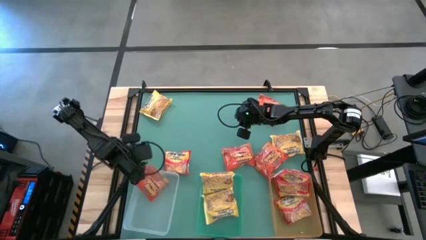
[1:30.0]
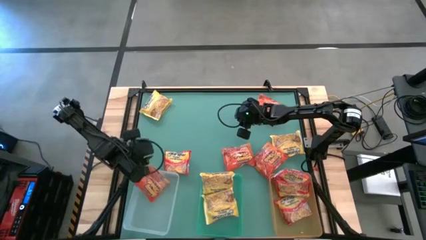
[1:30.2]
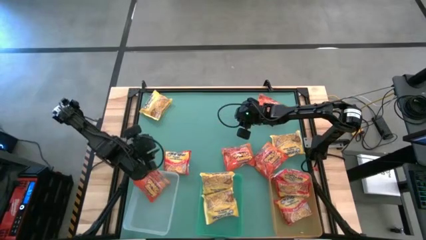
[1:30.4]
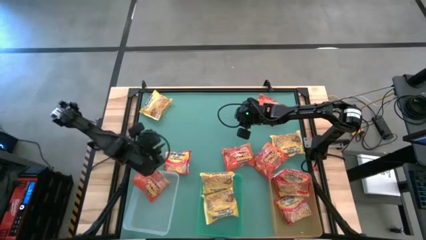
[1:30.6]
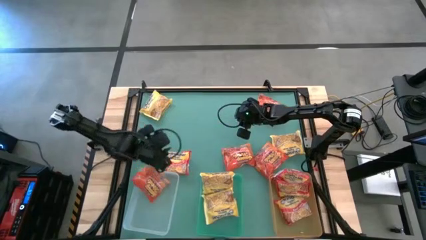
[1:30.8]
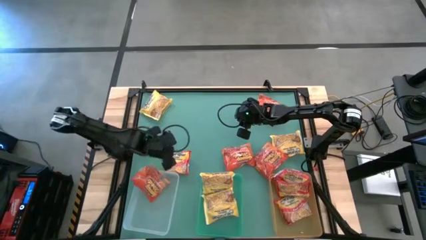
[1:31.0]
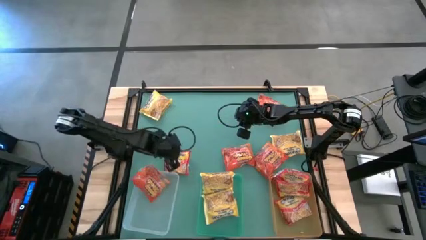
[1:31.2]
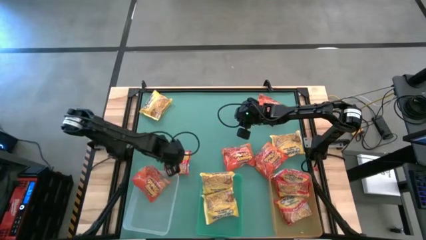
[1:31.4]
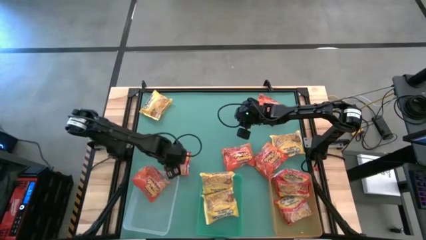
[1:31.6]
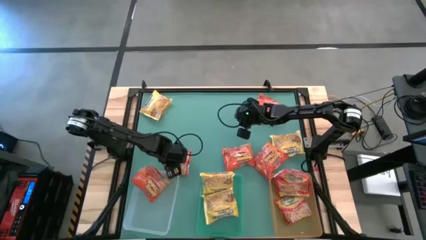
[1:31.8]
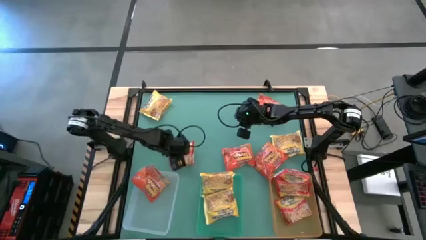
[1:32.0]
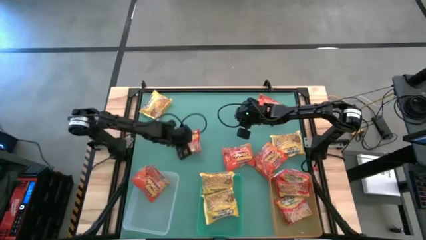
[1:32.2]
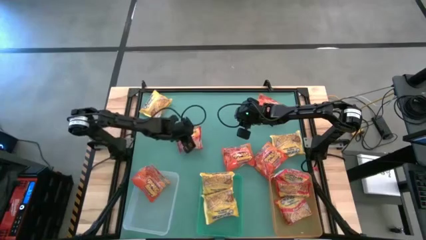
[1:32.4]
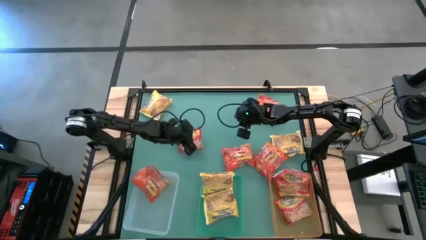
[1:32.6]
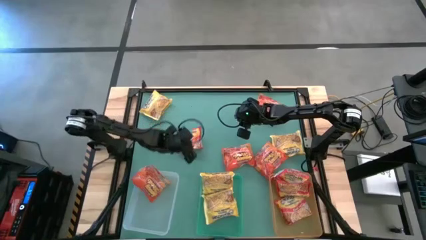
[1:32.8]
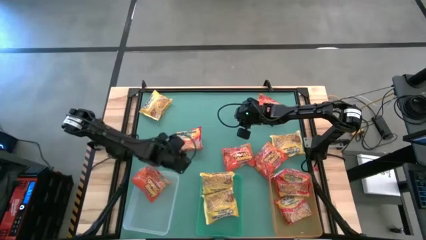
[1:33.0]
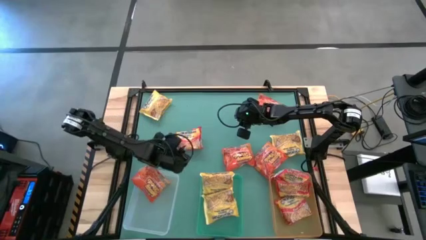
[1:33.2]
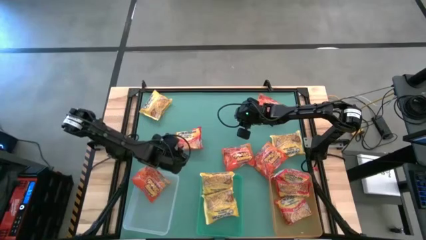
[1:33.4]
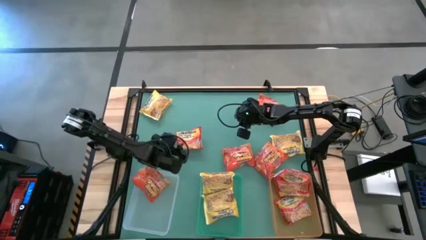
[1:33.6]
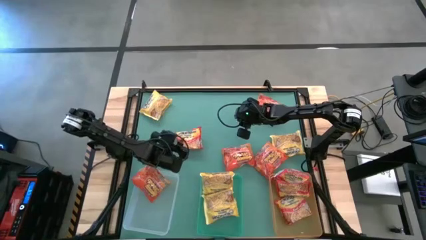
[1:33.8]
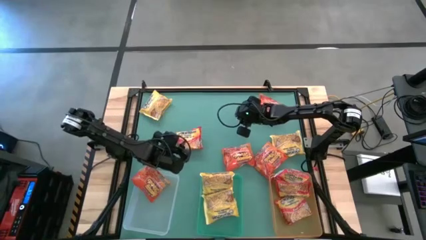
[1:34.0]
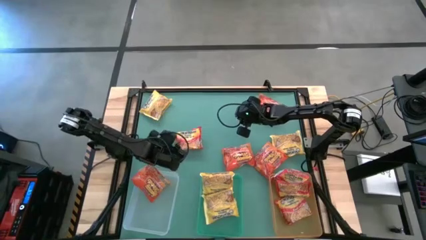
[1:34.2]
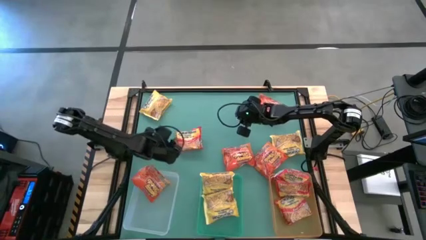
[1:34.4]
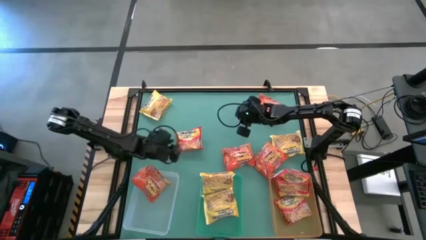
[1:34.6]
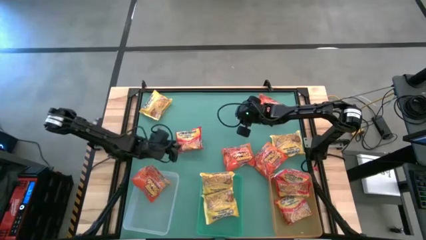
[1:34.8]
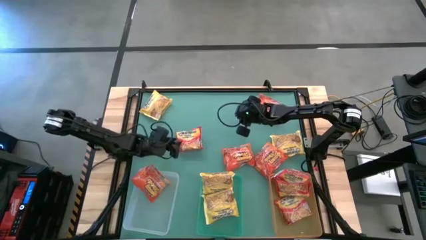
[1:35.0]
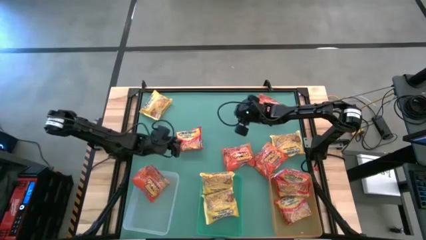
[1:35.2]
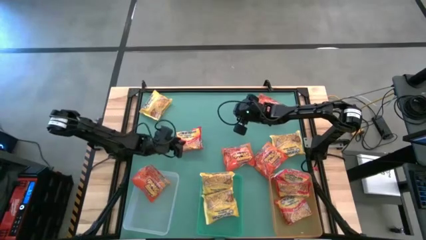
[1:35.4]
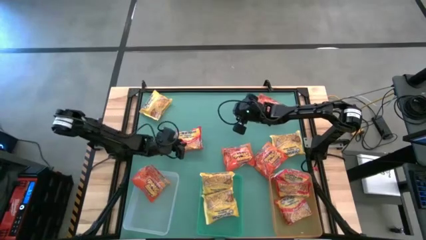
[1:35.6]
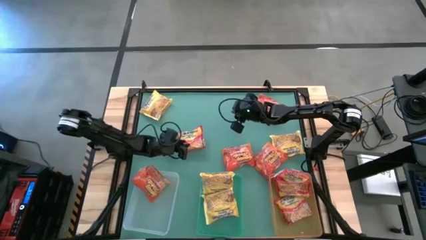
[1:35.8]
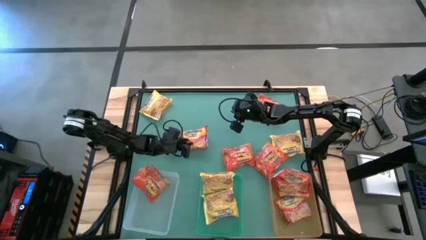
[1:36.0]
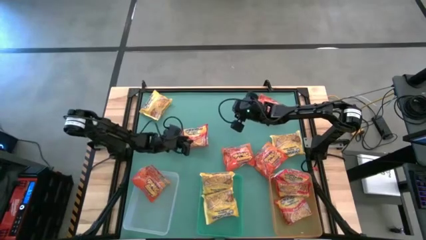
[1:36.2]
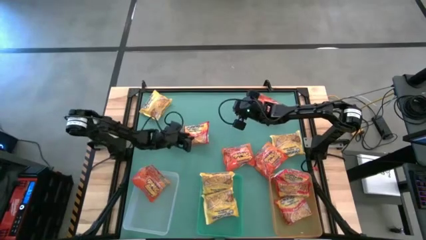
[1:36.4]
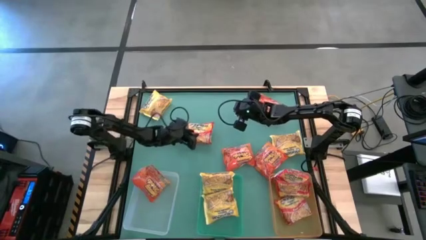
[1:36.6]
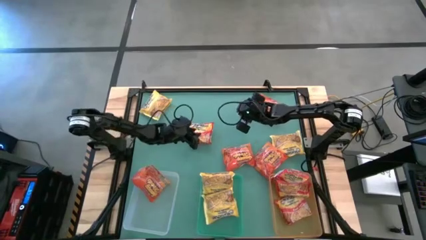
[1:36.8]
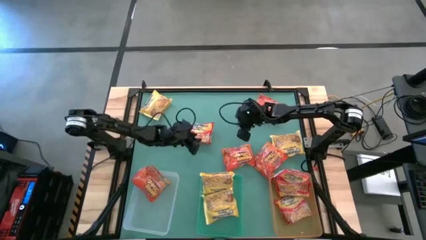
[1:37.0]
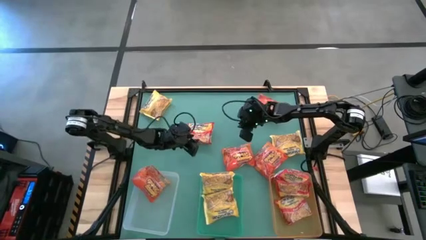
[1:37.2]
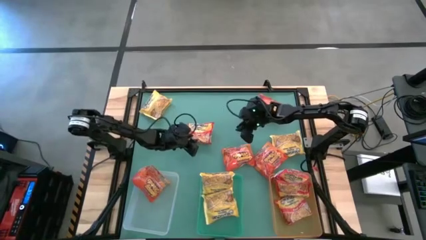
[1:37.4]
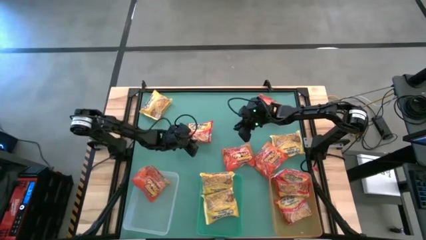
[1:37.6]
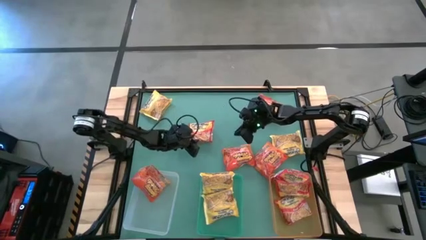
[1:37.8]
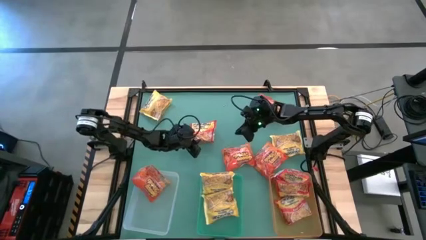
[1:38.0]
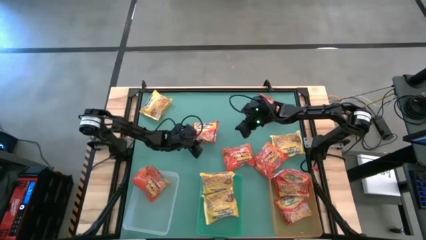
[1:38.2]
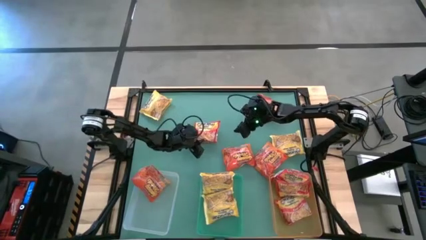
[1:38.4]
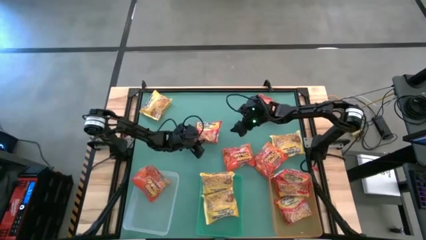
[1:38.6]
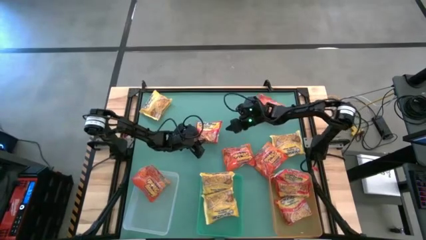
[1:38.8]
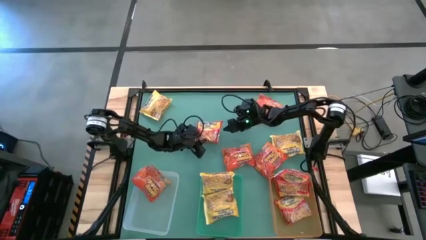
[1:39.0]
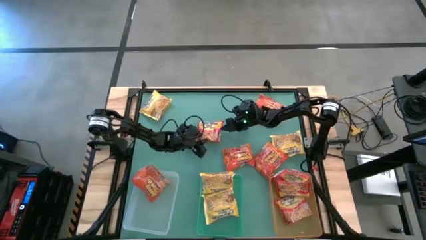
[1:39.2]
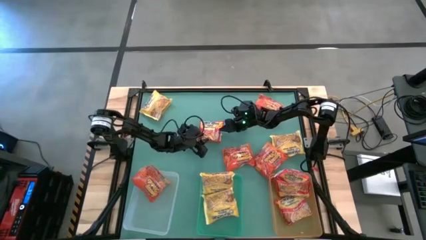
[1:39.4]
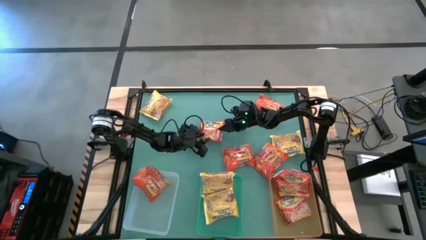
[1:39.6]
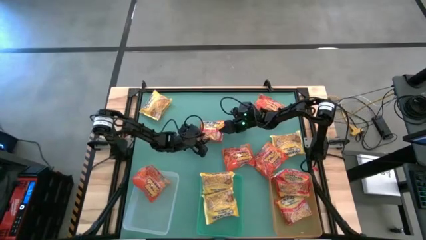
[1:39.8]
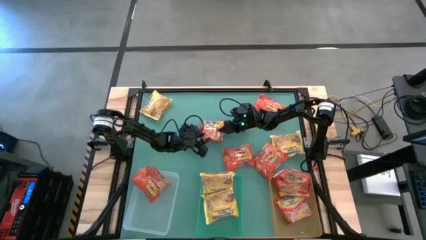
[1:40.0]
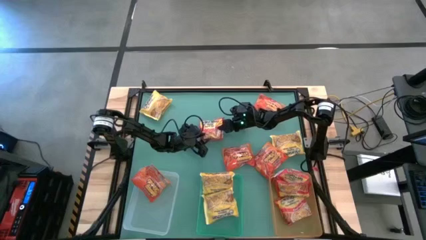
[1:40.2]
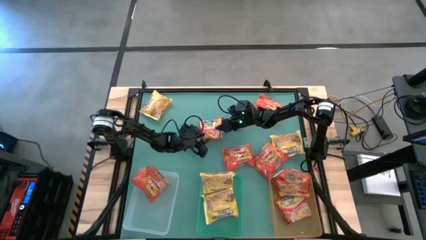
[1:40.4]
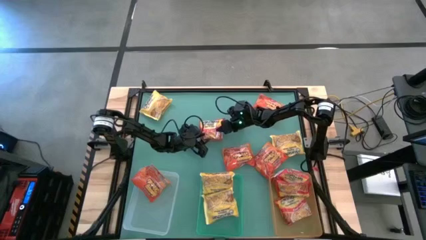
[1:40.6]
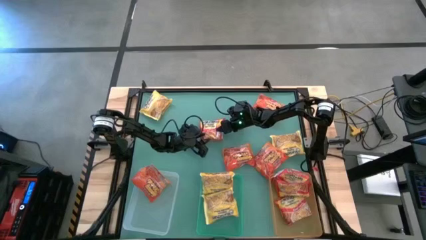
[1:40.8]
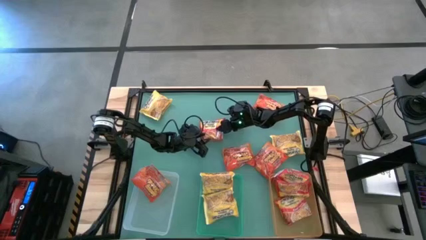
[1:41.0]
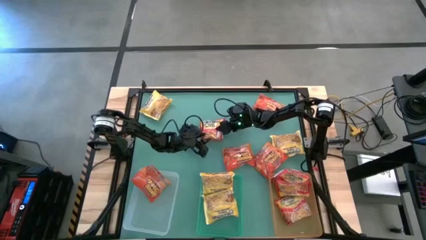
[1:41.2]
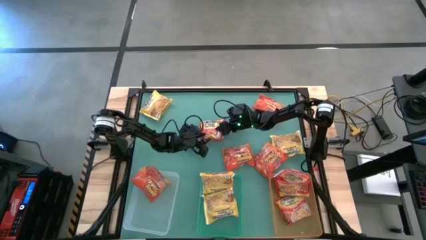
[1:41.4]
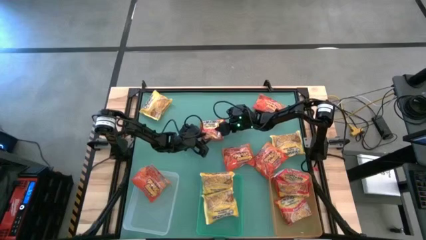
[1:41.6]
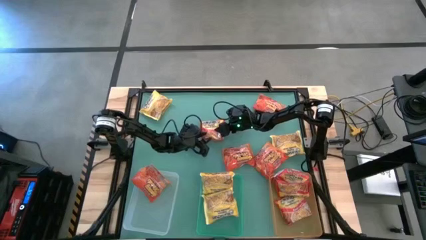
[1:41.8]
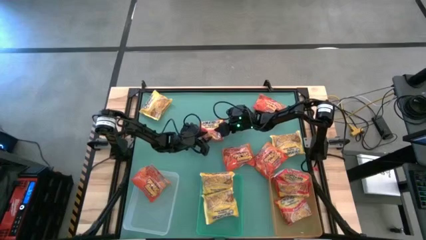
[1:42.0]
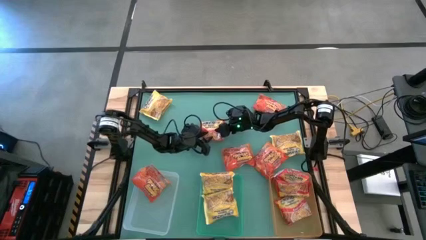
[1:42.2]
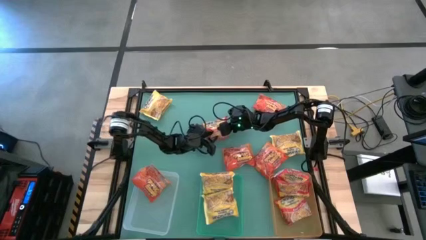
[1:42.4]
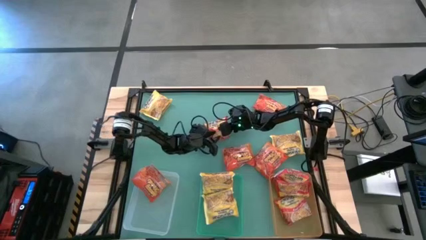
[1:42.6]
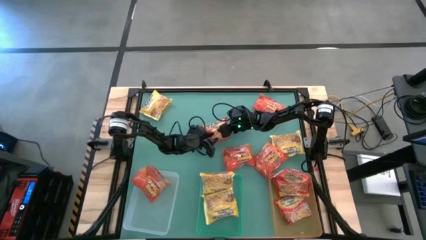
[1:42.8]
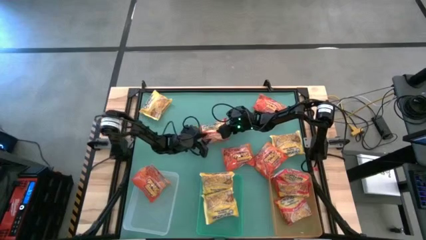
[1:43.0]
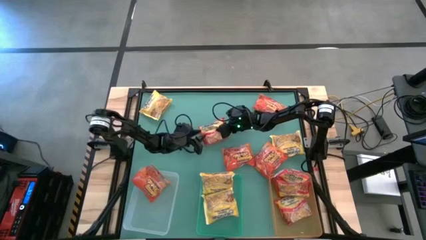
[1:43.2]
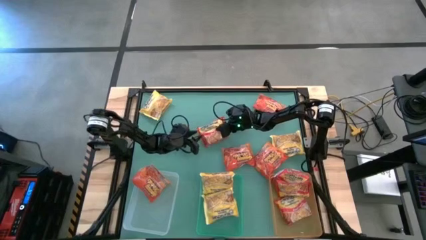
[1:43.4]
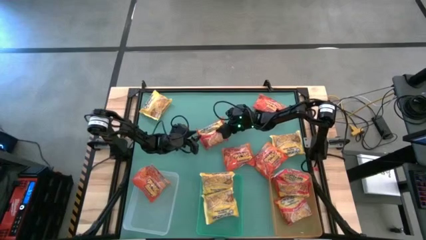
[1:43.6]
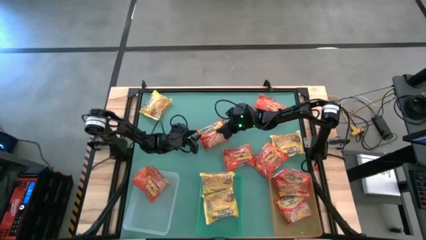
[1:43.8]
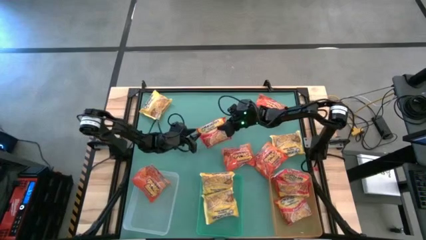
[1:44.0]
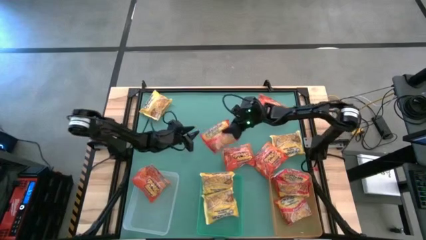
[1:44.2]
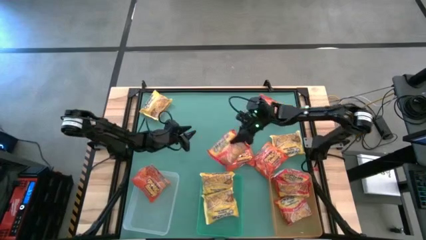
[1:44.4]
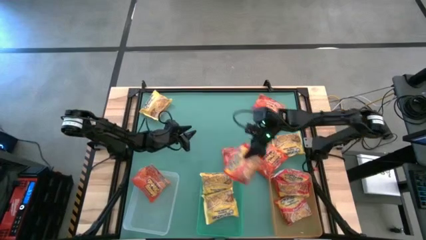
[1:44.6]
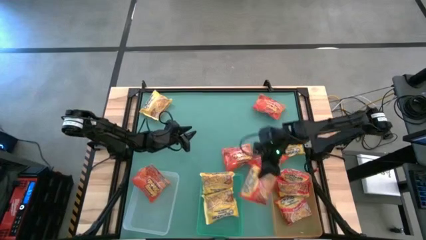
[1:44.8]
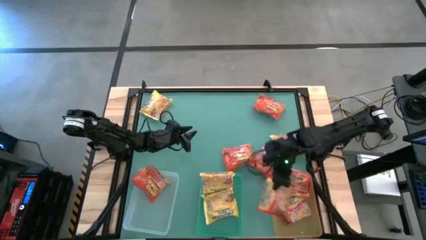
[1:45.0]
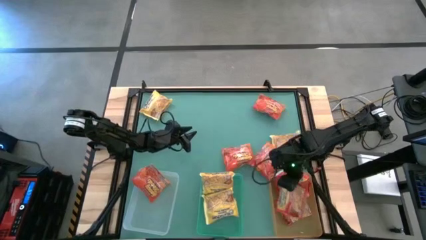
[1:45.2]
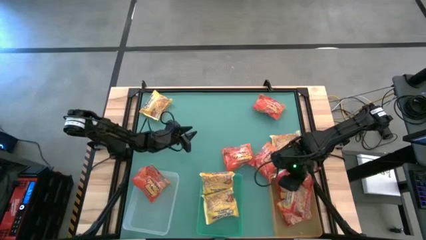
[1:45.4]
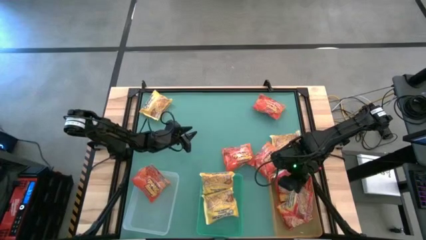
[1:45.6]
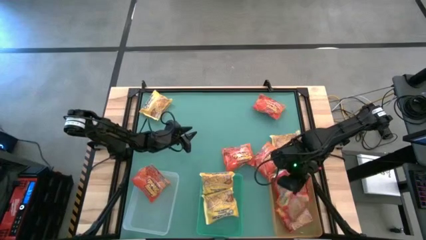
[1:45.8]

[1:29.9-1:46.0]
Task: Sort Maruchan noodles
Put the red noodle pack into the orange bin
